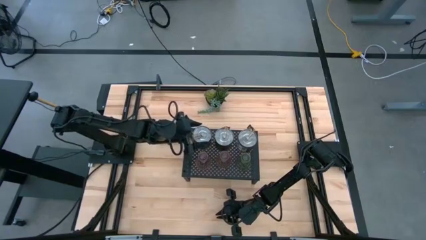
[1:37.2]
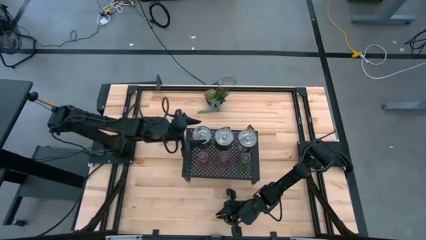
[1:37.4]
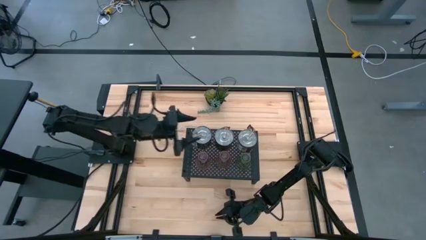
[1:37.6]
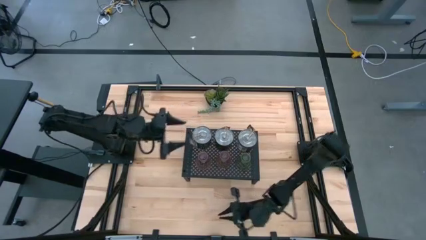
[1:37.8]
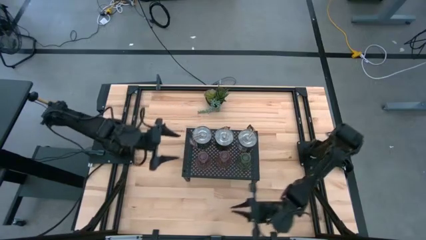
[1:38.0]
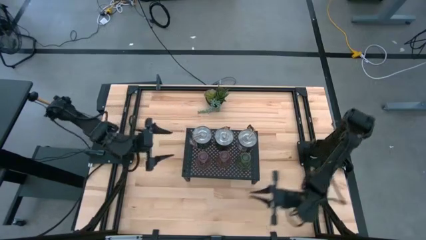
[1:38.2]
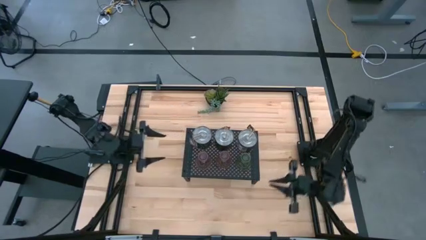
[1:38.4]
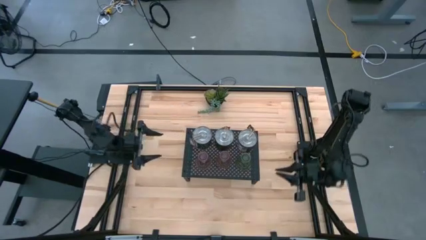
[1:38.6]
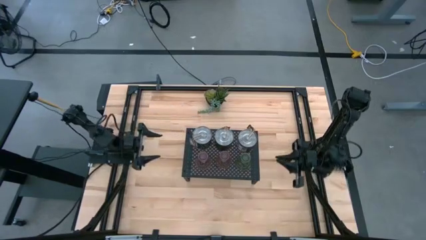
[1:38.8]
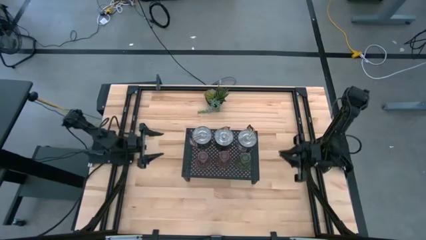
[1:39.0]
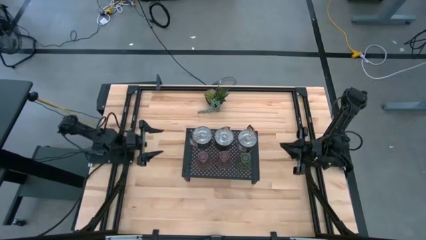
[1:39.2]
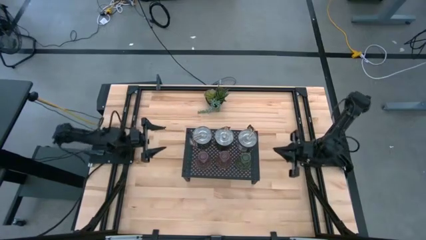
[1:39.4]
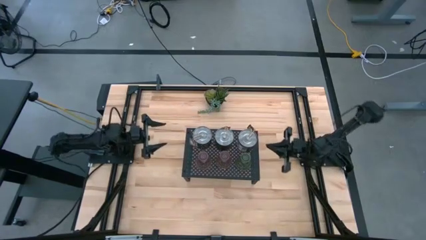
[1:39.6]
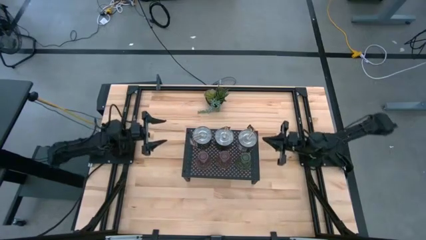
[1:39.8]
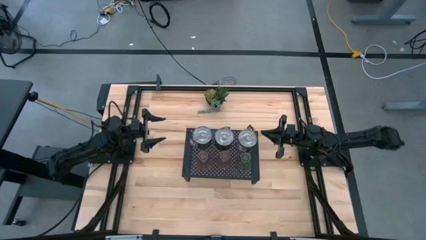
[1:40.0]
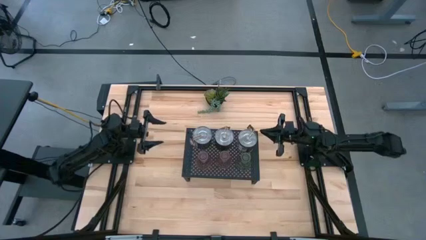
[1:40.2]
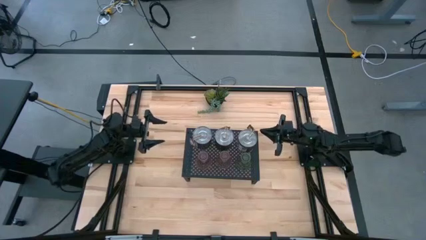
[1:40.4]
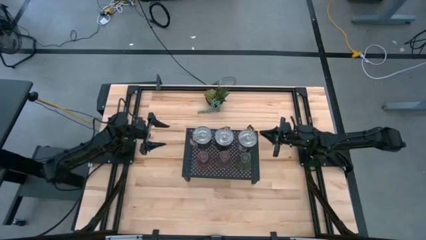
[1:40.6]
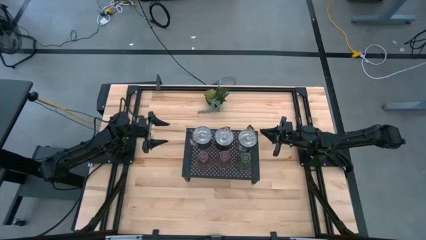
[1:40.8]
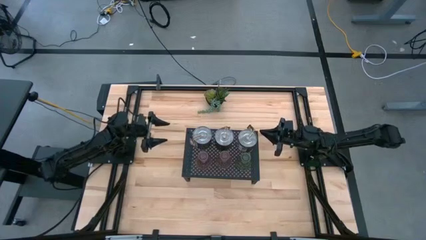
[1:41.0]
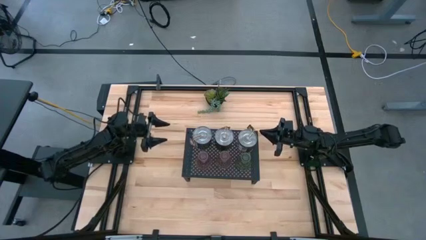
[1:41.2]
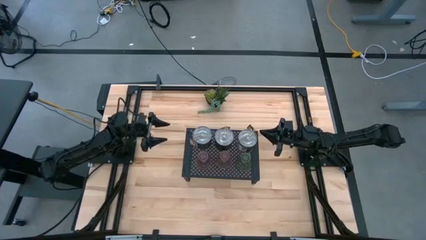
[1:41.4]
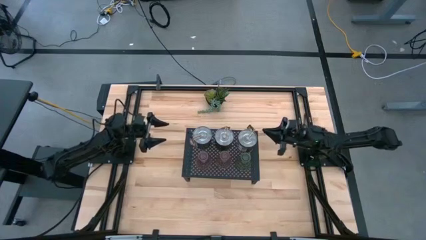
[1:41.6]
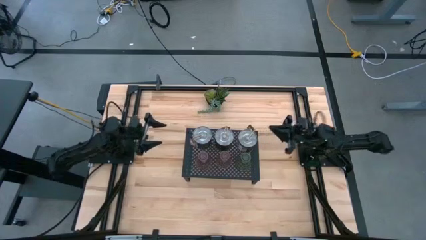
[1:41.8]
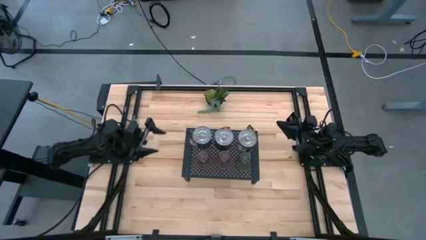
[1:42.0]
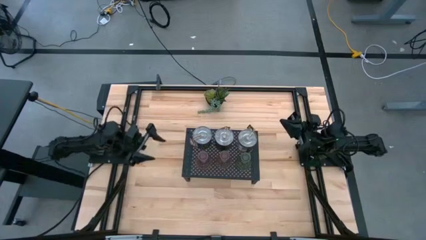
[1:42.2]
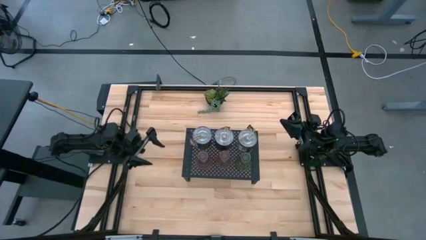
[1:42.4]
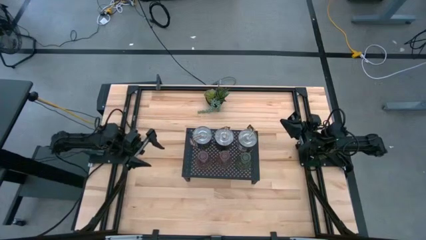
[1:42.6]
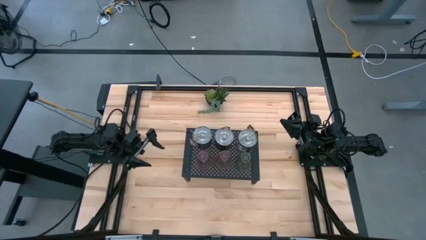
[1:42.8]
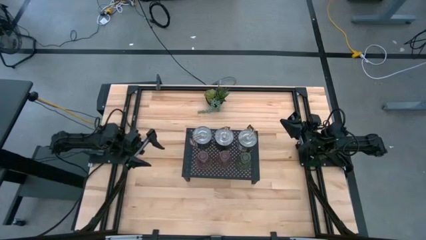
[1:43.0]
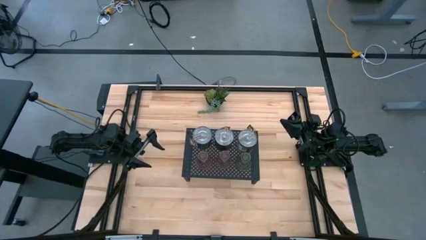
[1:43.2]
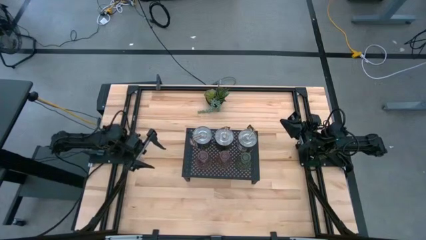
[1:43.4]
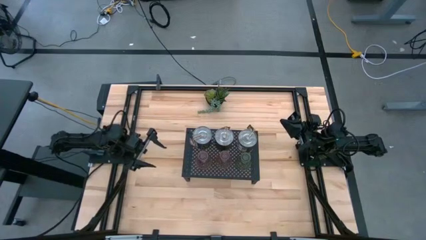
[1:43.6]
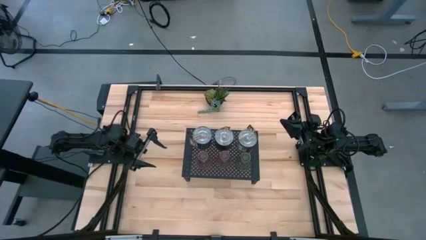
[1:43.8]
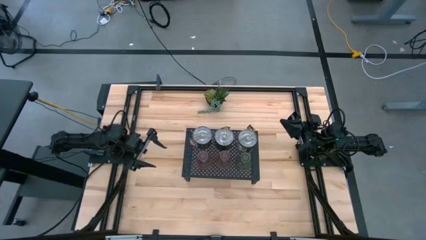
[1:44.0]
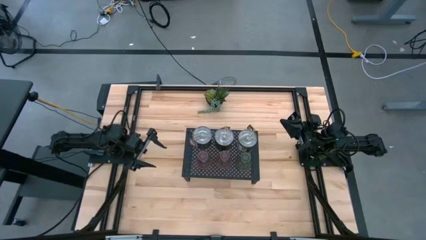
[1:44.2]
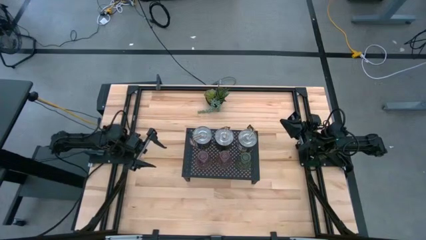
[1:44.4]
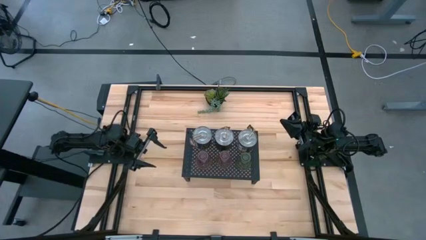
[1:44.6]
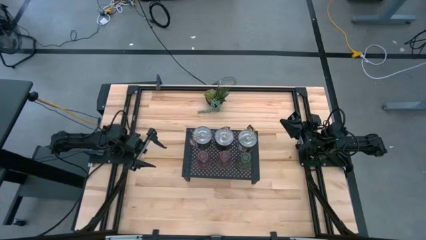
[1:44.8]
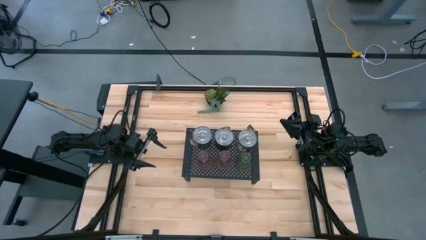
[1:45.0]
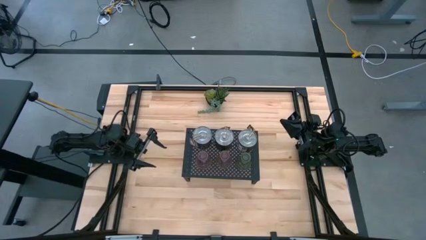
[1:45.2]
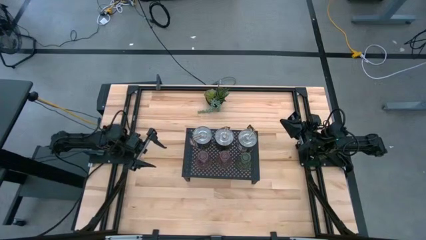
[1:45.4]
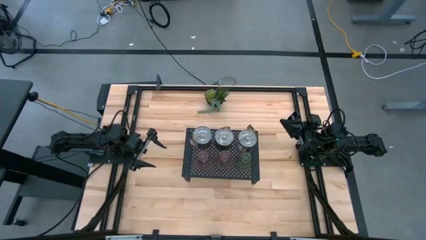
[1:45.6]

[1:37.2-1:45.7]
Task: Pick & Place candle stick holders
Return to Home Position

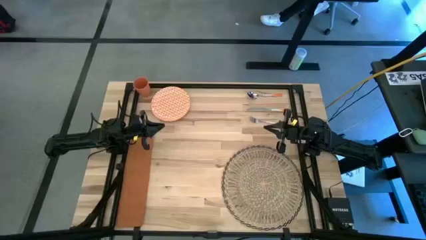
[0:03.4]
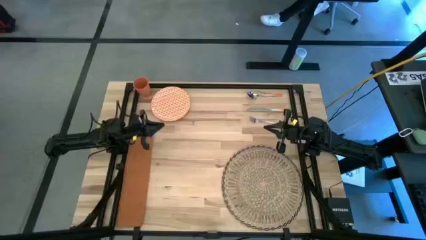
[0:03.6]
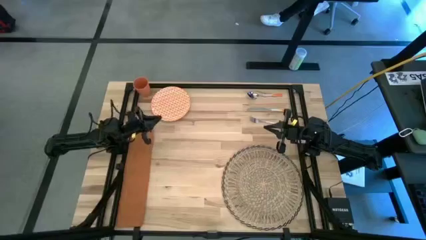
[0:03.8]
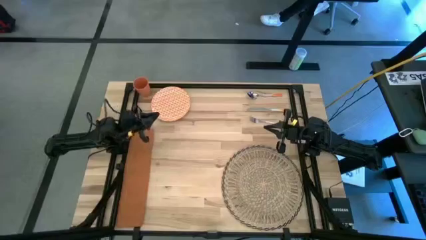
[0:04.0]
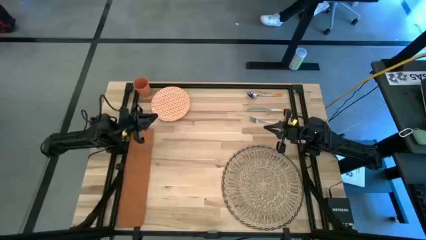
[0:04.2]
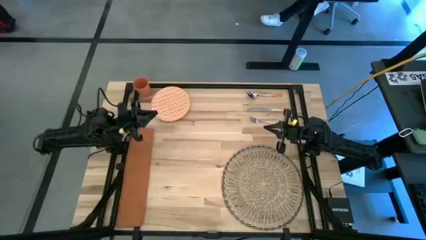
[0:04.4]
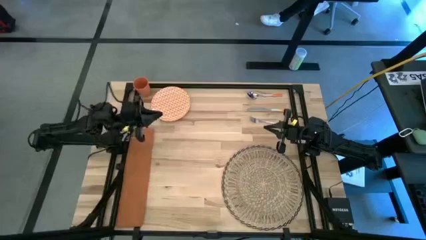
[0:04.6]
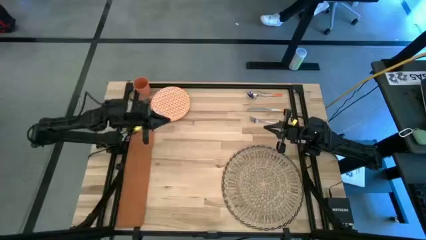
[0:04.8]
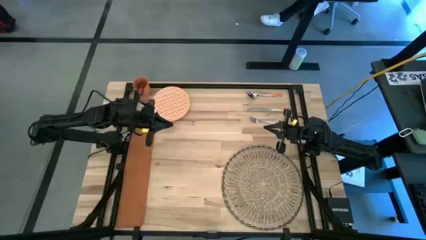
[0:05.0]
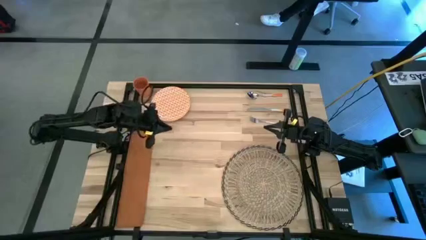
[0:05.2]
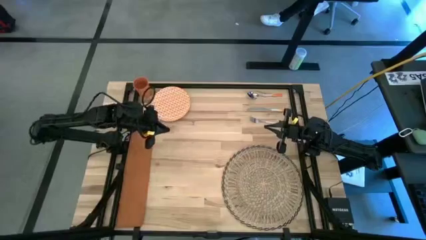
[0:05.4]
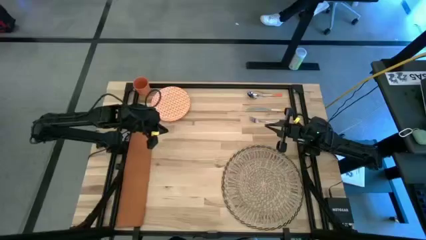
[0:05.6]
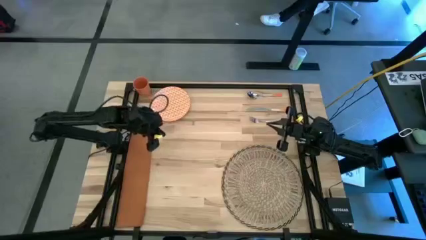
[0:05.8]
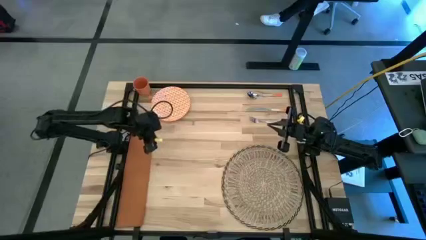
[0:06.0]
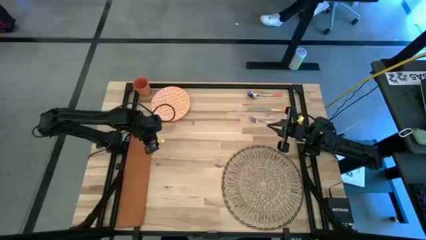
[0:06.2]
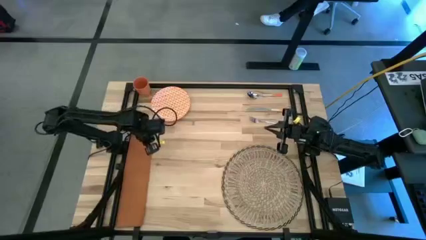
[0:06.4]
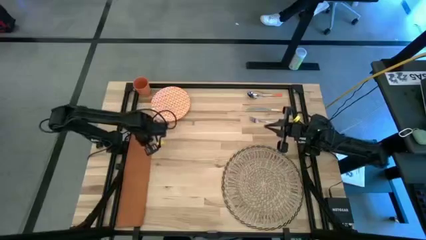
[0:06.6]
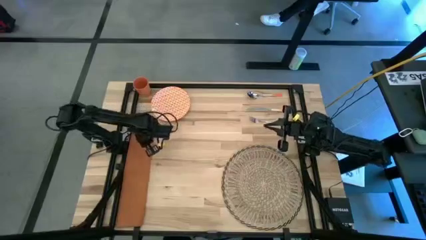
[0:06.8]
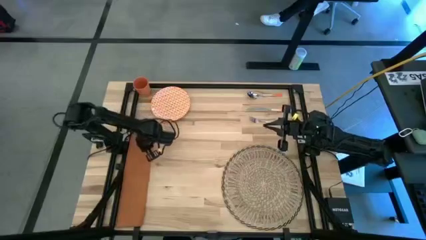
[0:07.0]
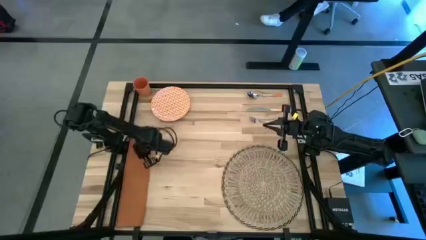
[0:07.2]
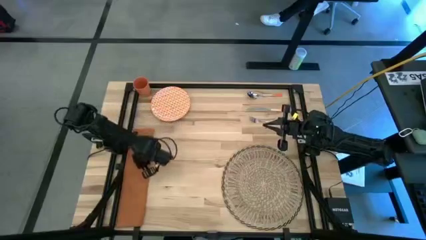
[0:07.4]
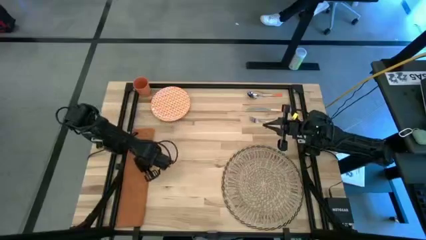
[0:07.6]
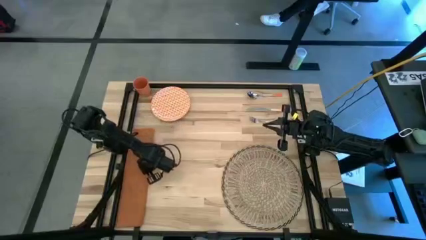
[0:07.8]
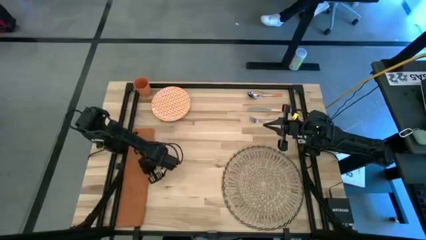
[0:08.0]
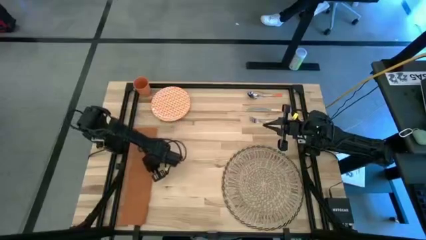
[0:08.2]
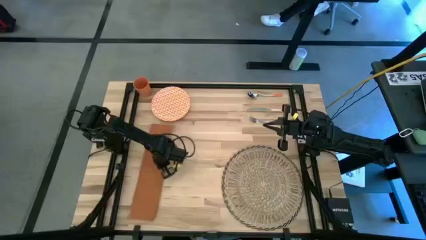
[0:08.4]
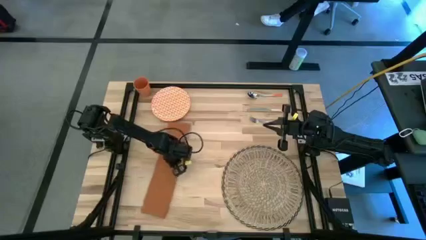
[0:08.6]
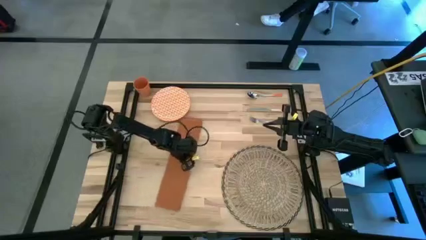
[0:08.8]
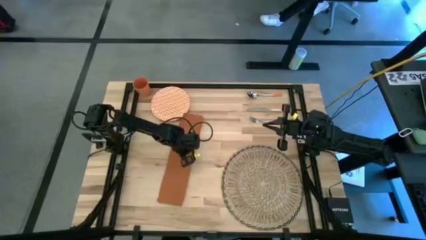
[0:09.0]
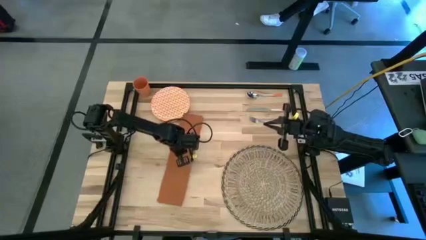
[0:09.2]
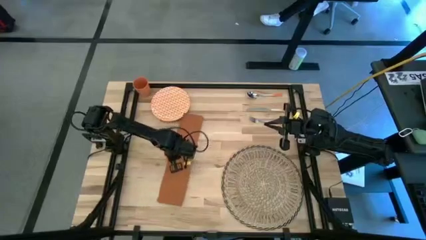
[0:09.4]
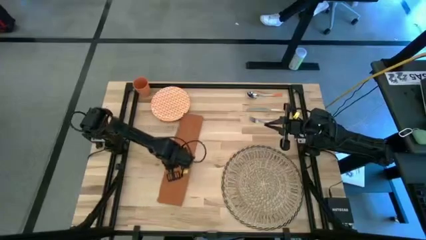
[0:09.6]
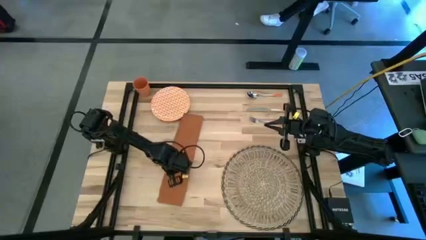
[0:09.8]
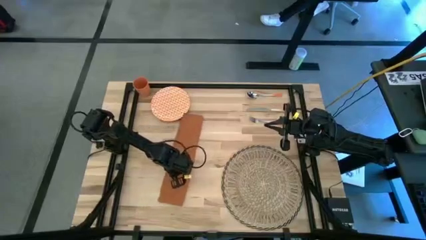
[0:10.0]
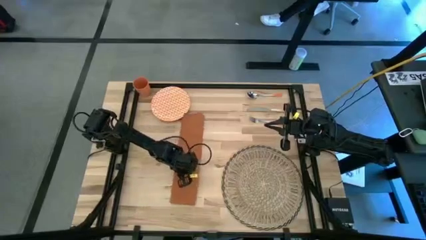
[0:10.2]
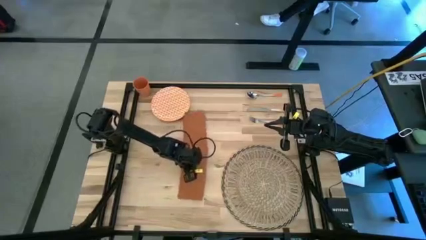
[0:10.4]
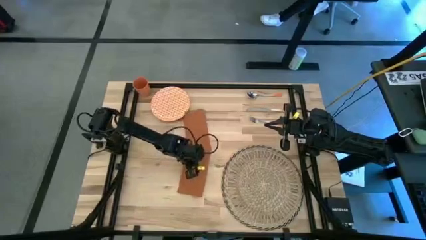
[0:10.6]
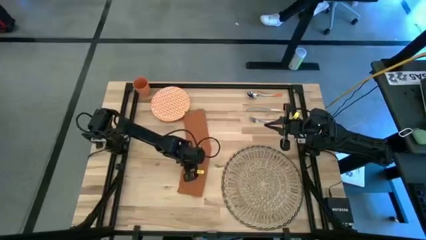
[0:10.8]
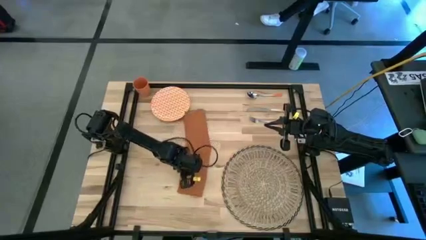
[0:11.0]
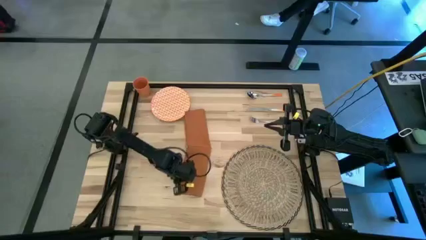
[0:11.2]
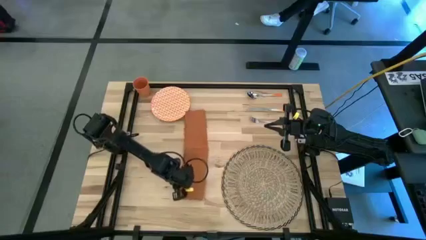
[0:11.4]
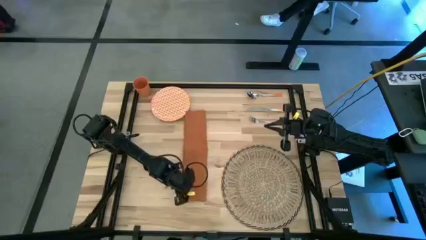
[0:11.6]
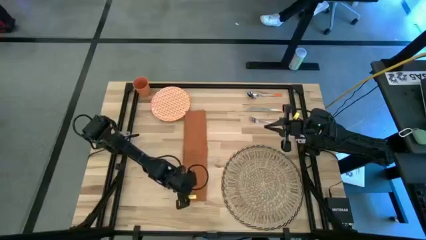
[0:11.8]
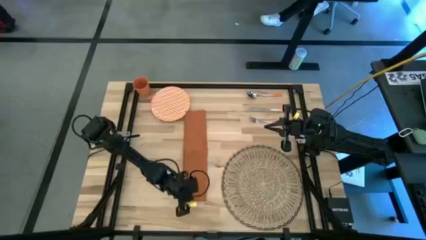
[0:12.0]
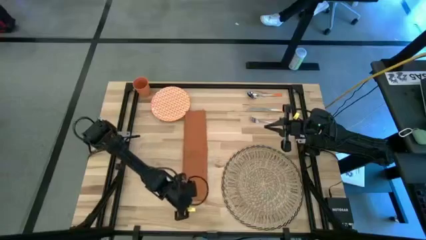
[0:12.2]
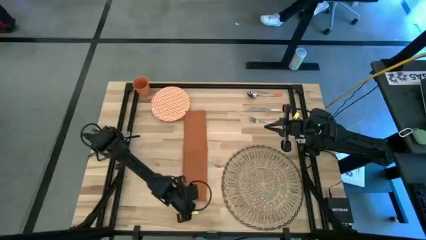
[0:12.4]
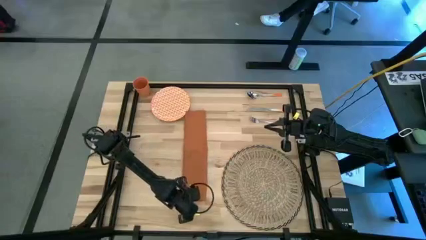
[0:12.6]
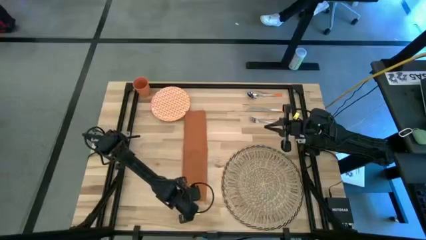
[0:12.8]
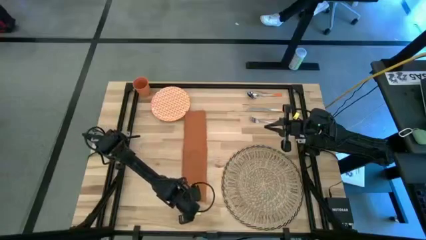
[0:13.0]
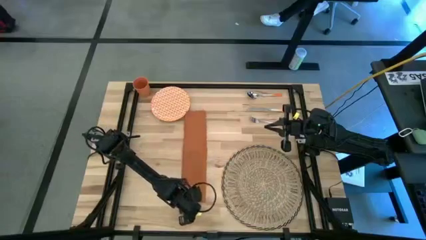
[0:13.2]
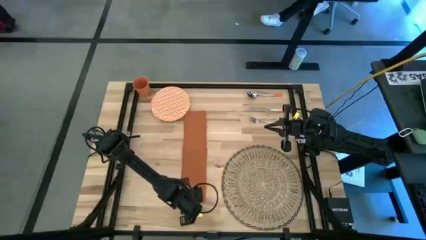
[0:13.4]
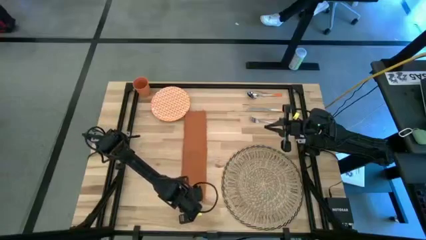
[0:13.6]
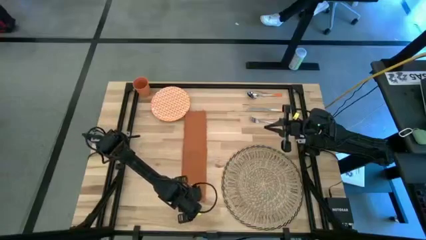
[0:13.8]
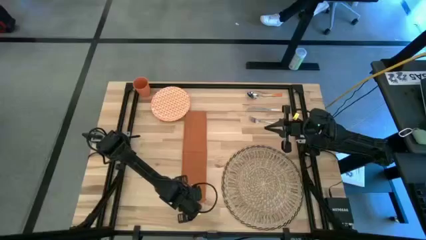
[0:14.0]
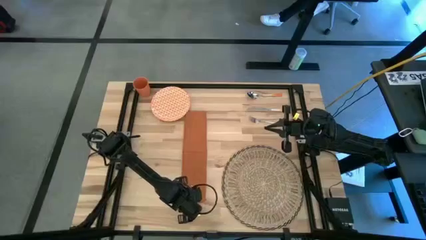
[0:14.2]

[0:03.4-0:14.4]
Task: Set table place
Fold the orange table napkin
